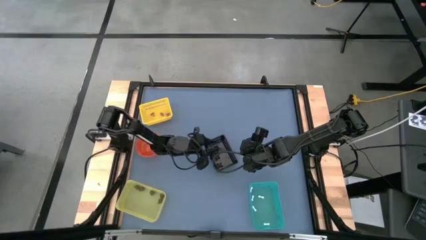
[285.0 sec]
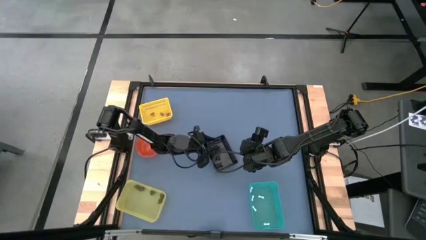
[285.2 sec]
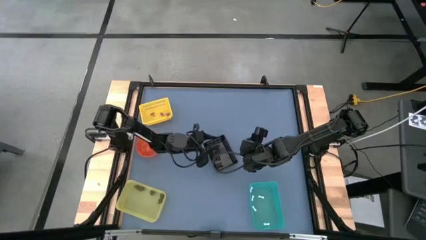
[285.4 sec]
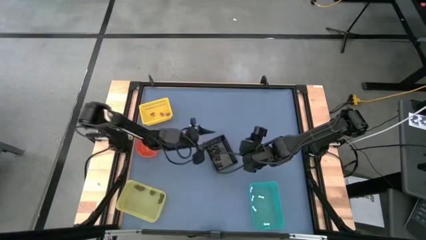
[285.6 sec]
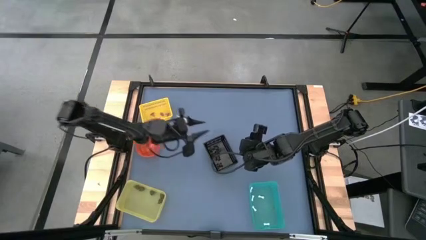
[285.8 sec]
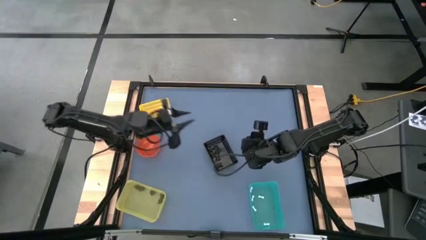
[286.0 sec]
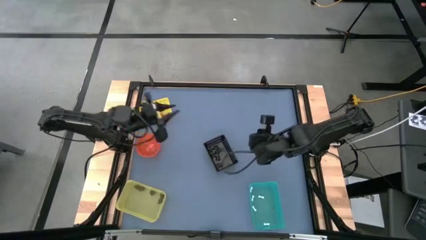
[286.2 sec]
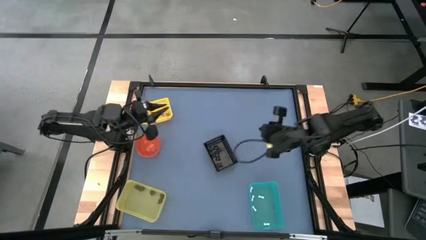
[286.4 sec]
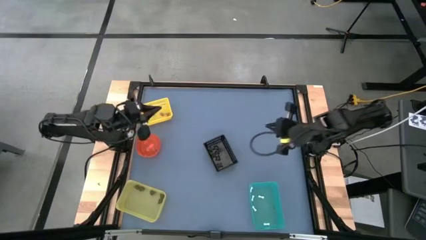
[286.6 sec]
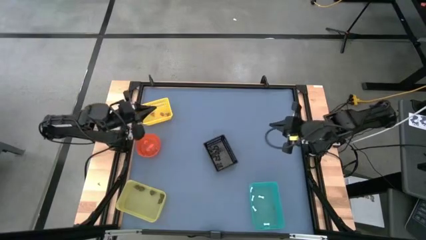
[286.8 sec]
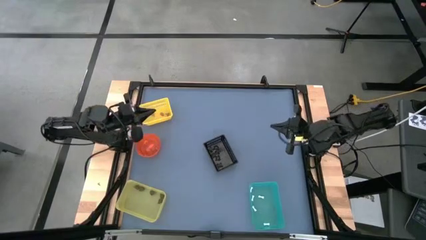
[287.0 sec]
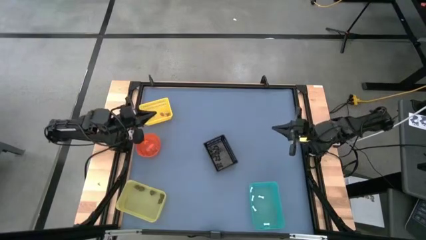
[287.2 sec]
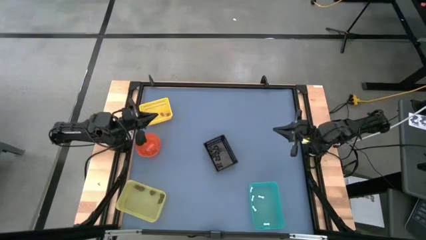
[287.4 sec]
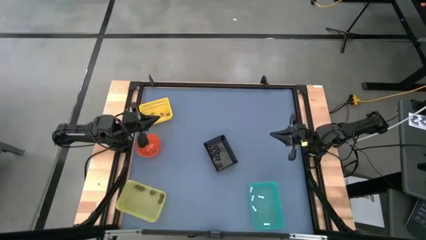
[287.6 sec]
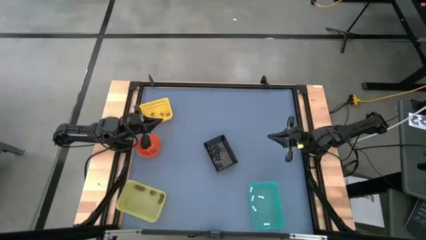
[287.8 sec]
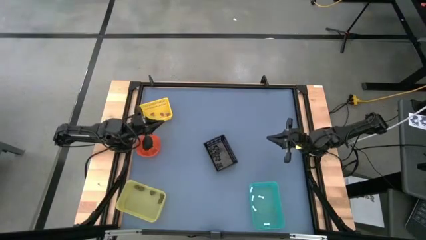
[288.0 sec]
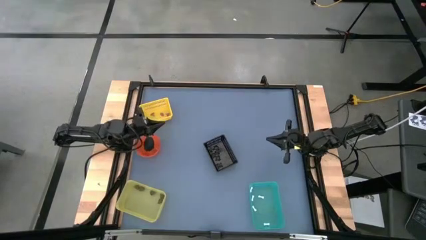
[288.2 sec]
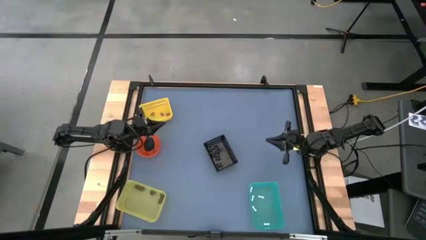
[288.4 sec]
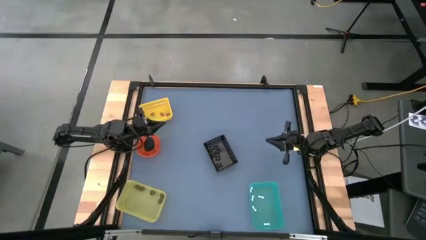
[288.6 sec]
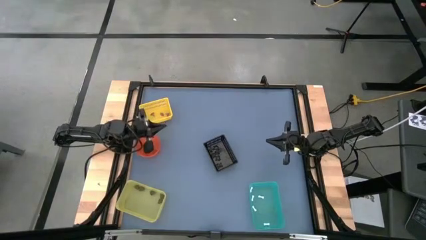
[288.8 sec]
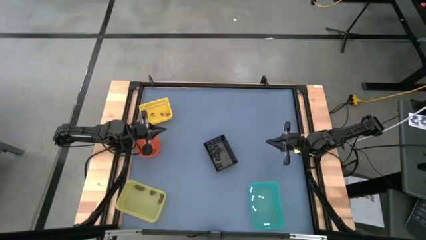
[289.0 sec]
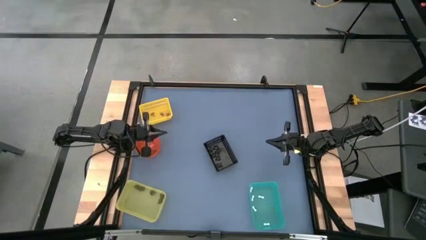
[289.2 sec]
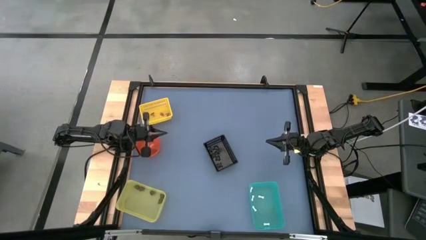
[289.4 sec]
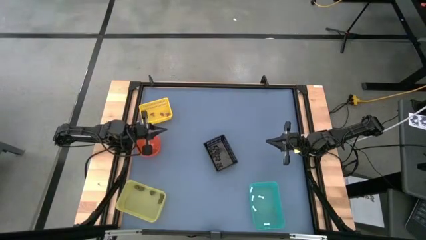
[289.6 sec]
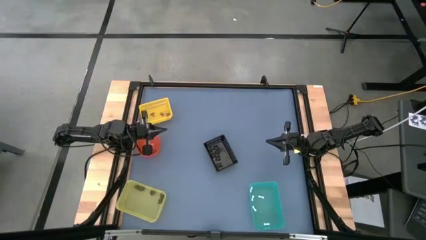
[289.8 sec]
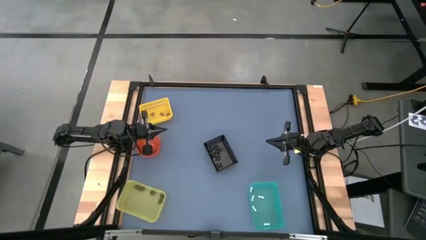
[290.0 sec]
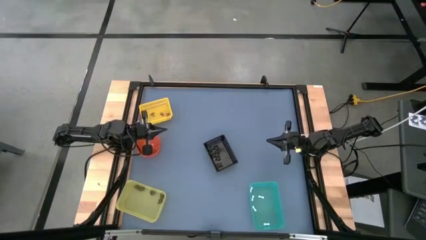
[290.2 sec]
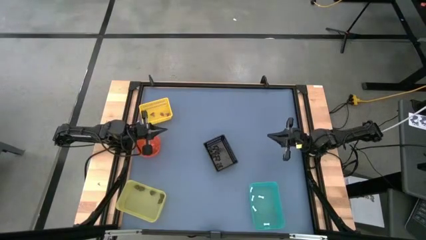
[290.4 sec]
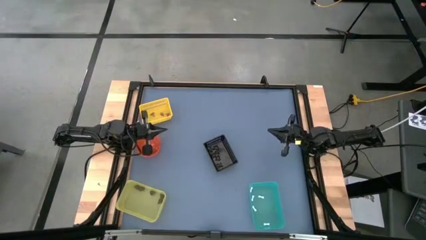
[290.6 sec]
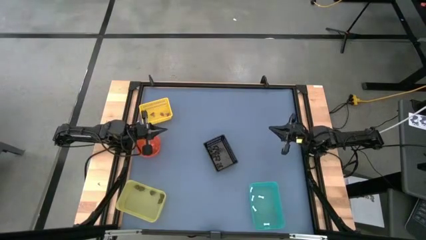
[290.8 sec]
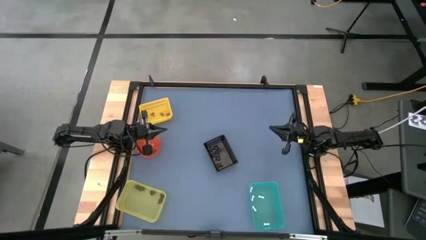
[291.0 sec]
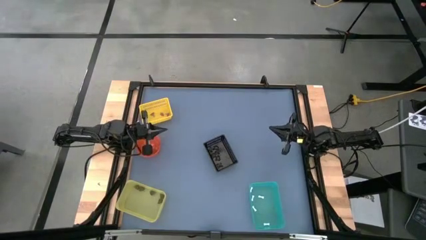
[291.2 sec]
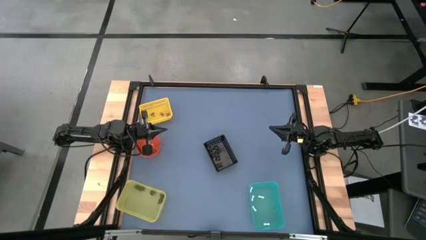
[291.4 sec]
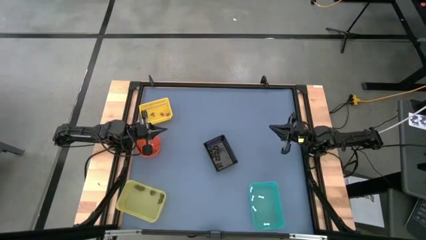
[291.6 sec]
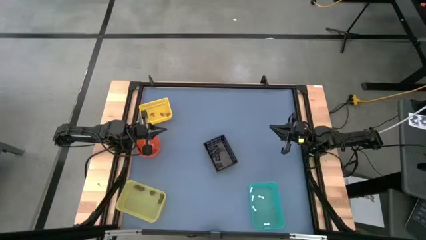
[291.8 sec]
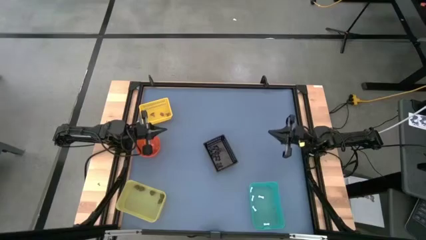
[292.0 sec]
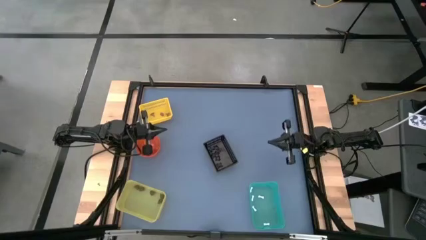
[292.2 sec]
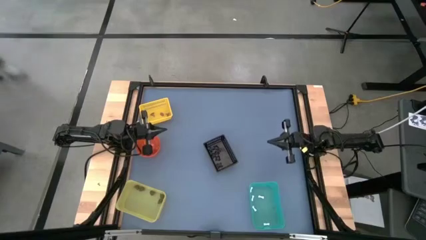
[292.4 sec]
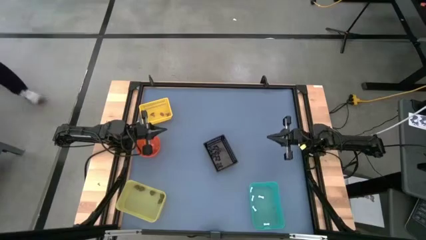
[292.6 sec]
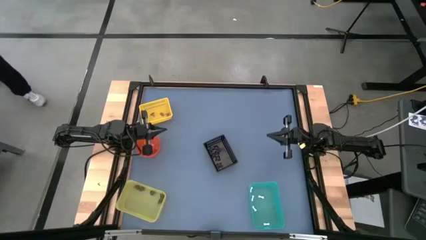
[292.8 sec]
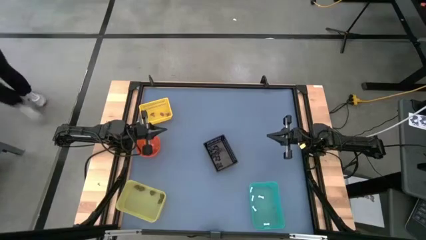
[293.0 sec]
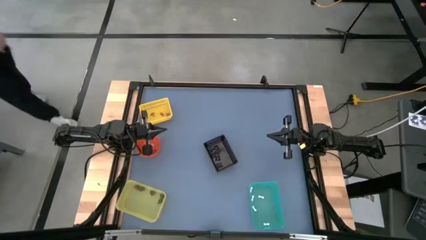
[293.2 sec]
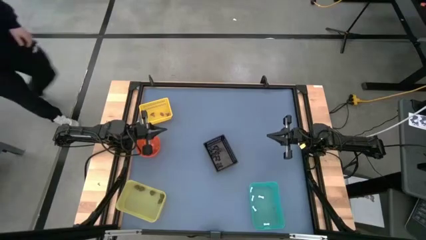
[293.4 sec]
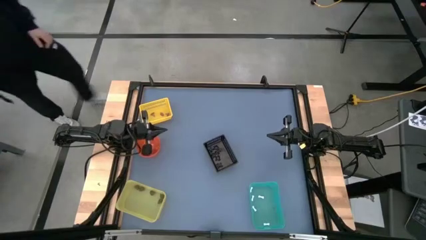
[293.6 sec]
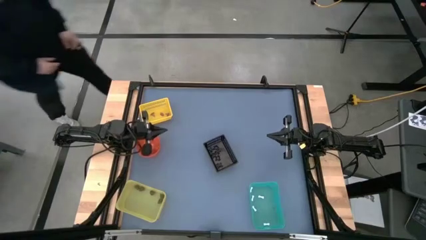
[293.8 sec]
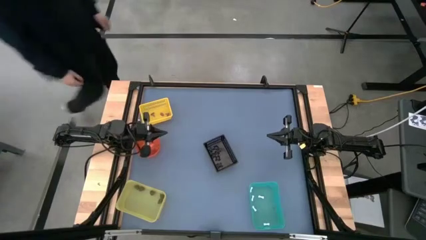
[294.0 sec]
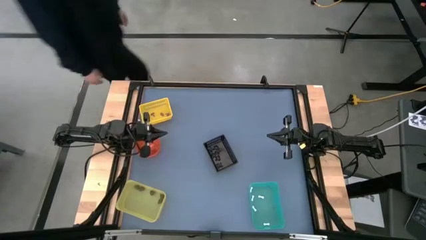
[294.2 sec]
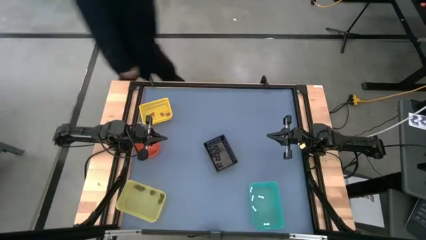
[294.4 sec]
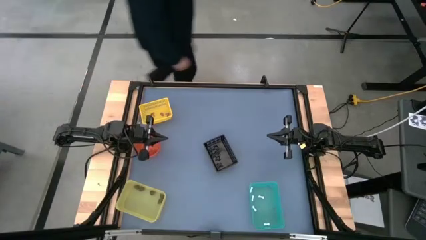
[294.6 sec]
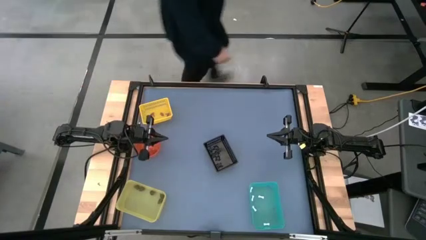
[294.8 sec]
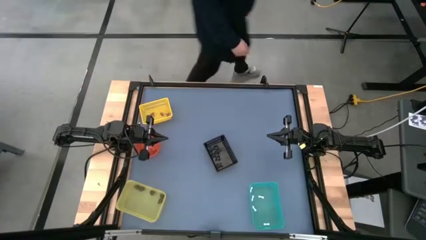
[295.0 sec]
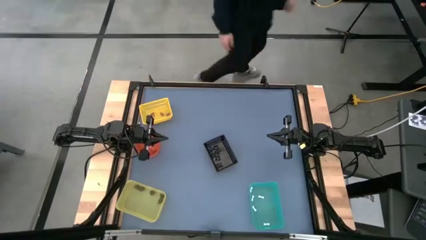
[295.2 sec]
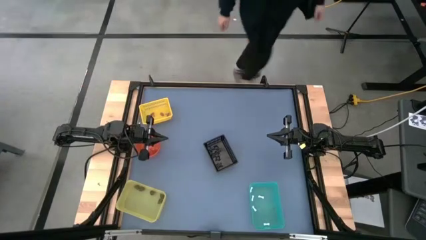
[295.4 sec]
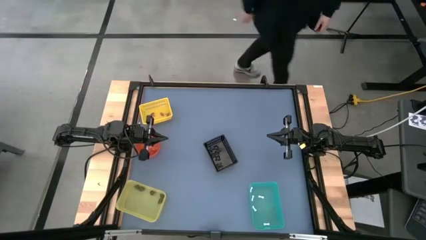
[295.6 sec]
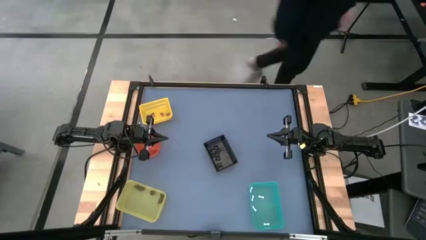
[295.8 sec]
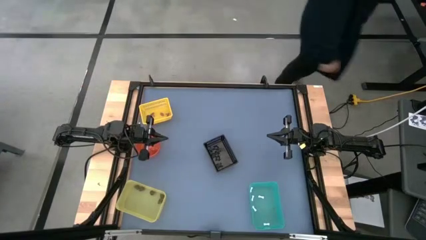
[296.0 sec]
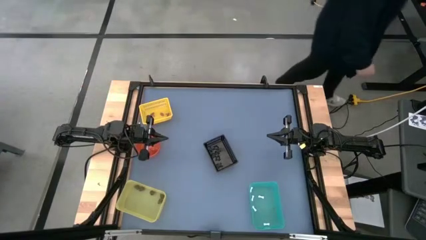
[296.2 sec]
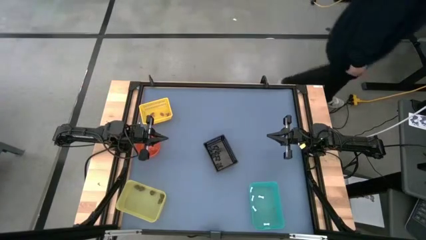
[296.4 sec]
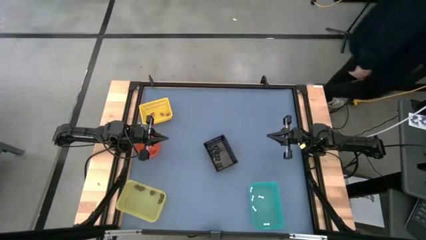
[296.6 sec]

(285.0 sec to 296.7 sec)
Task: Sort Halloween decoration
Return to Home Position

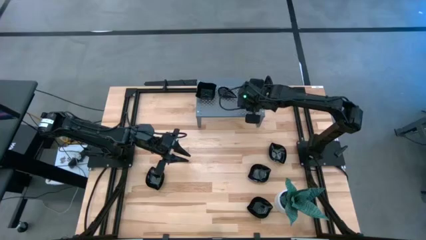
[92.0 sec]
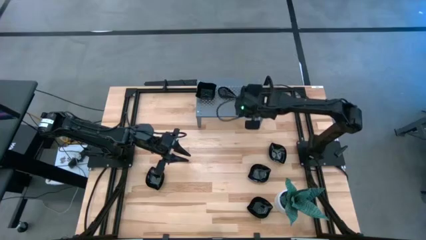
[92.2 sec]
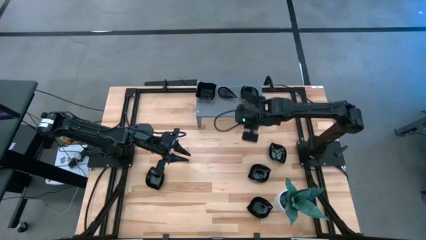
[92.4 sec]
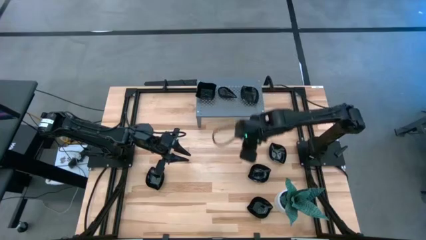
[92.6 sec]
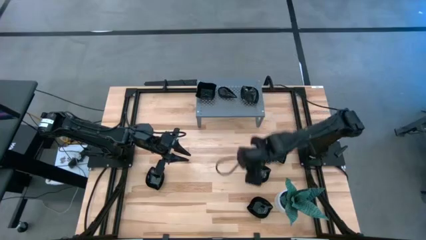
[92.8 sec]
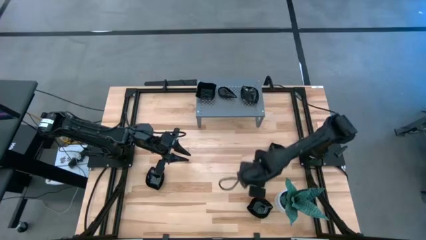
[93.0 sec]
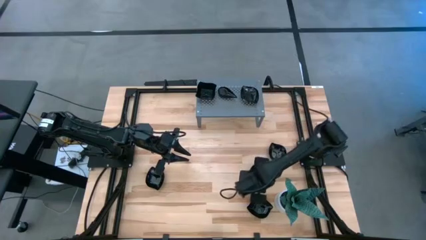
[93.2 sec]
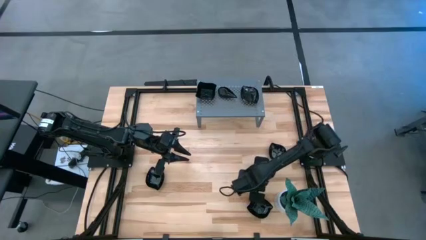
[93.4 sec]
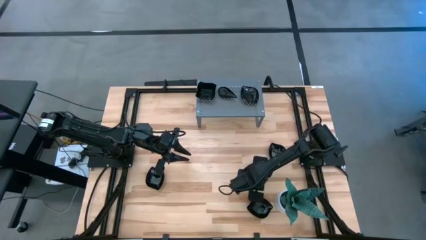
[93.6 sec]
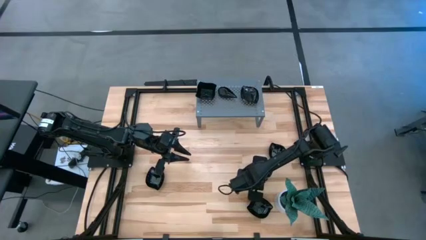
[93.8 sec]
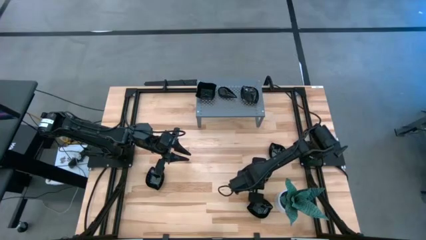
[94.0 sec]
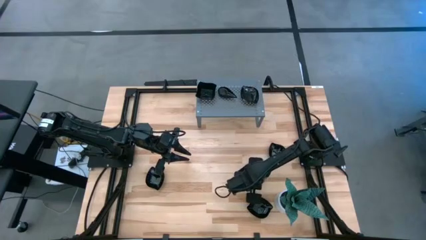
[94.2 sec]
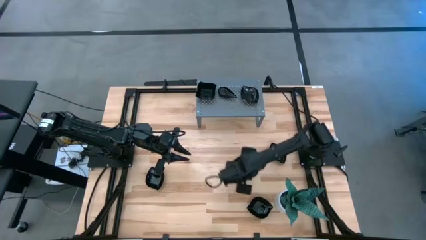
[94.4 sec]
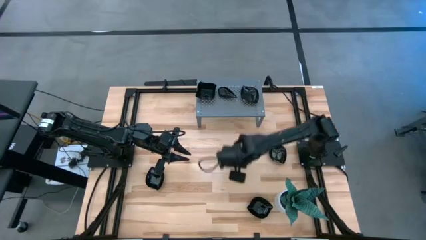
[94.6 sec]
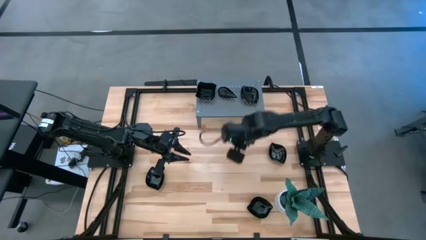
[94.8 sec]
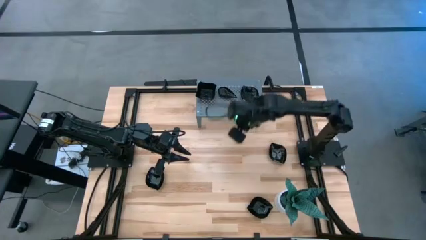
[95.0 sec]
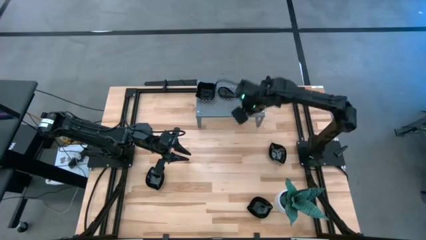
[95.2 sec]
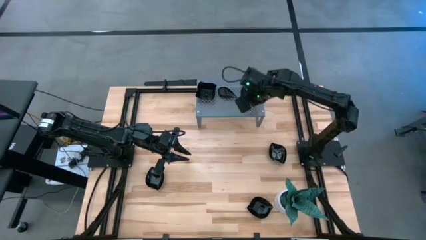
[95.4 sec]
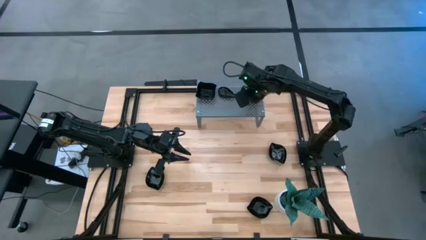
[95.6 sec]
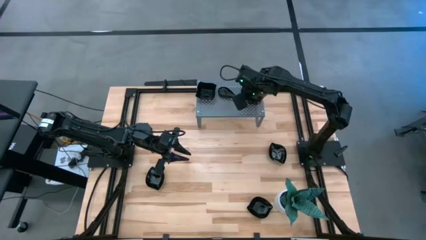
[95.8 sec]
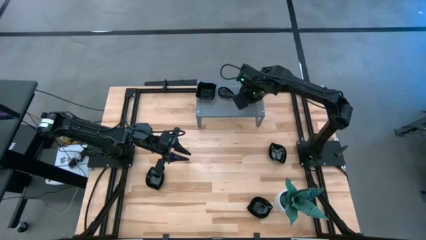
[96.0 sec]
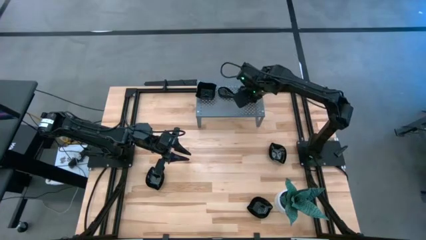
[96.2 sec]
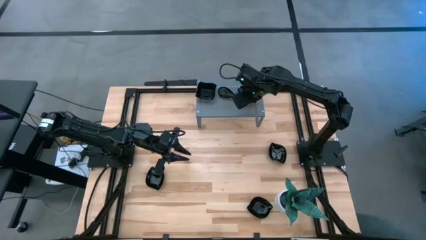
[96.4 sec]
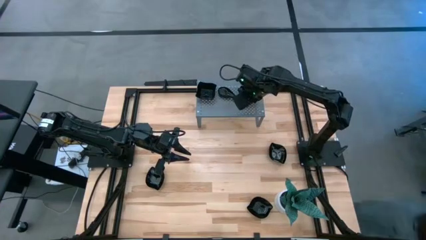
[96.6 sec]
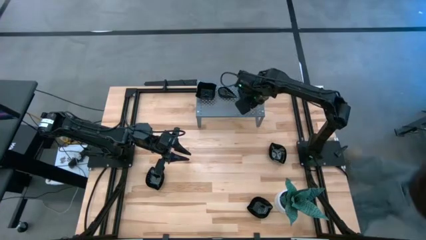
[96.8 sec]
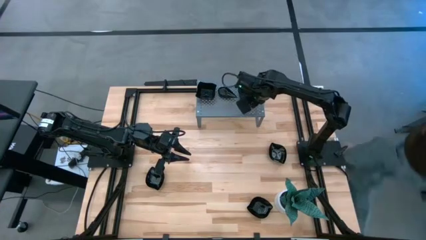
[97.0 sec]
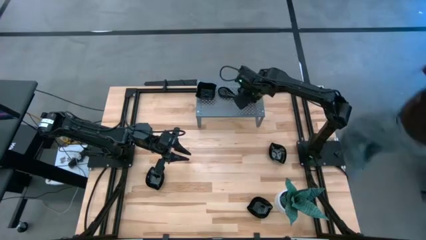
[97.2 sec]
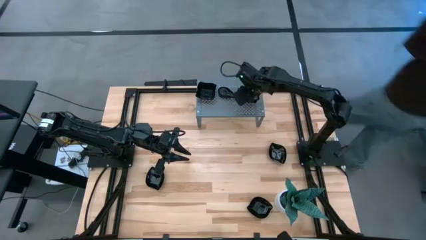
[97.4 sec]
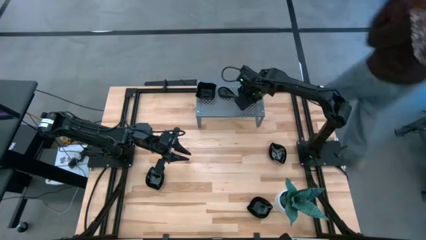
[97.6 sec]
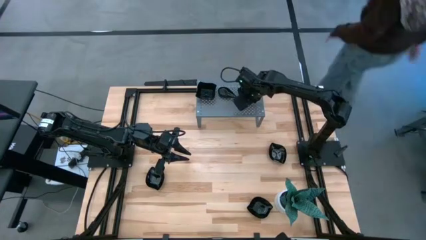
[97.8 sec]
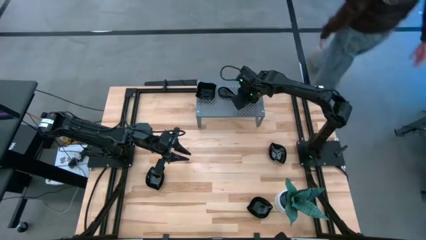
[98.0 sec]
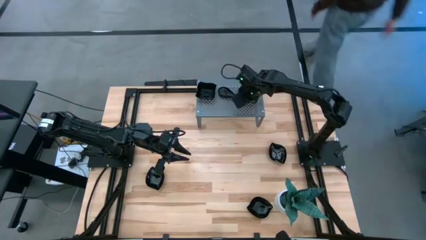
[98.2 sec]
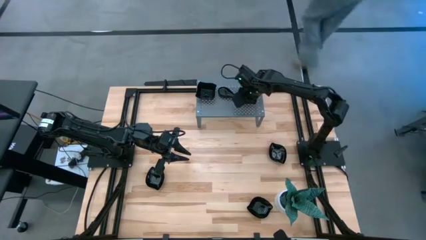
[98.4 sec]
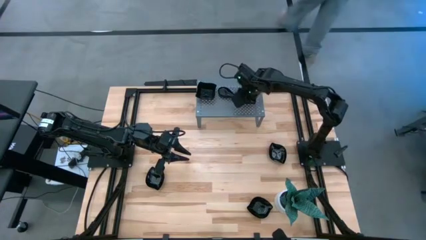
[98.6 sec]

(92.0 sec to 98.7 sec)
Task: Pick & Place Mini shaped plates
Stack the leaf-shaped plate on top of the leaf-shaped plate on the shelf
